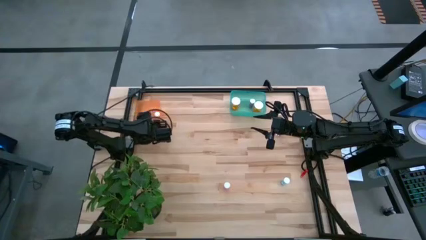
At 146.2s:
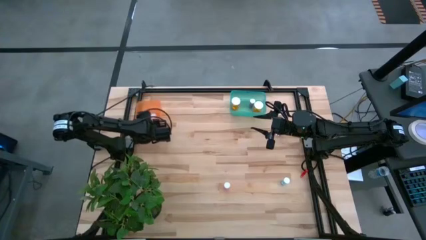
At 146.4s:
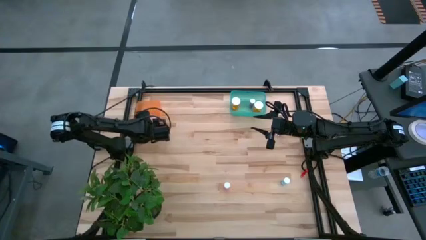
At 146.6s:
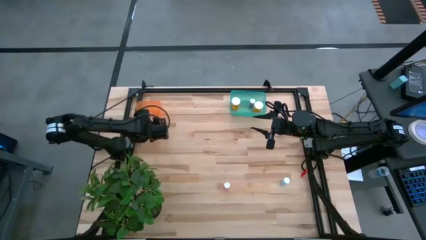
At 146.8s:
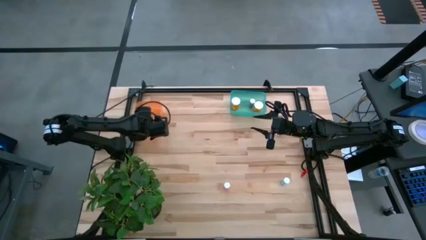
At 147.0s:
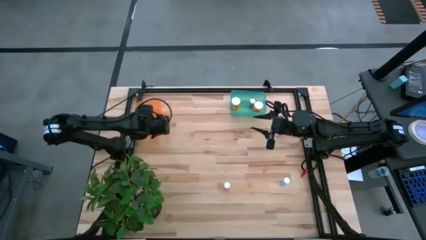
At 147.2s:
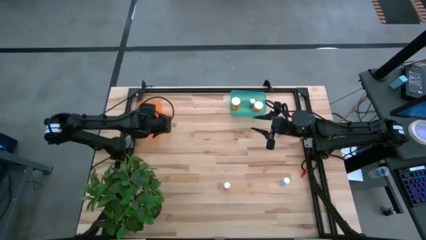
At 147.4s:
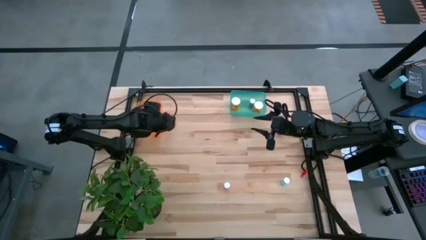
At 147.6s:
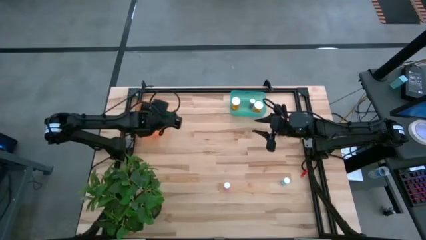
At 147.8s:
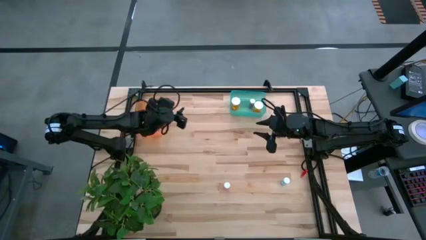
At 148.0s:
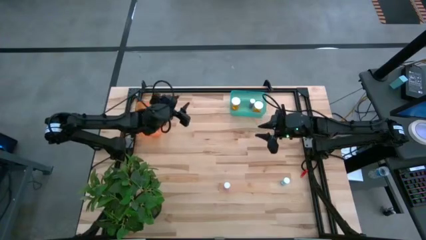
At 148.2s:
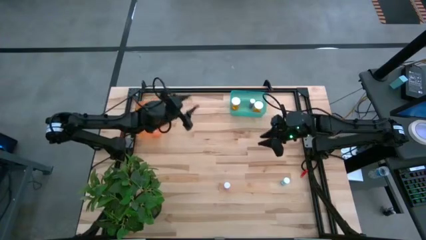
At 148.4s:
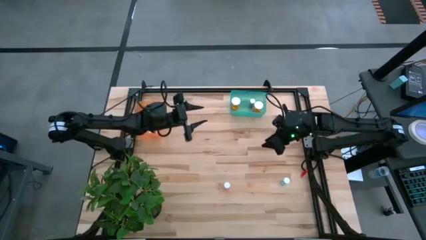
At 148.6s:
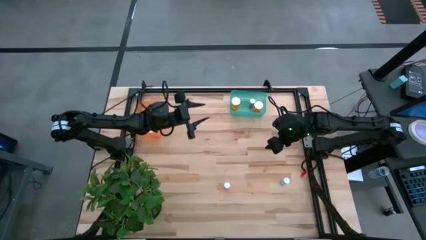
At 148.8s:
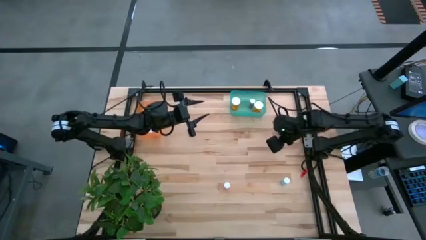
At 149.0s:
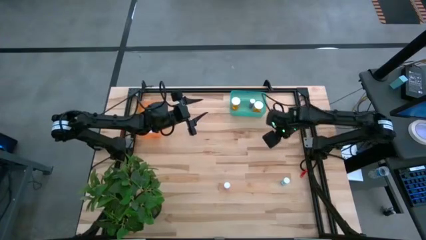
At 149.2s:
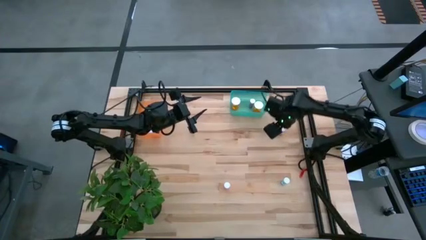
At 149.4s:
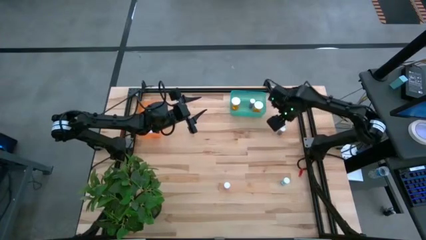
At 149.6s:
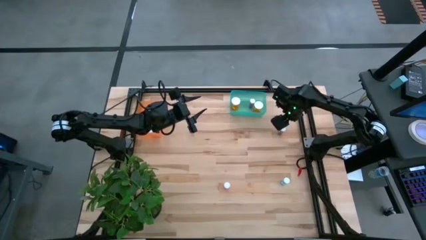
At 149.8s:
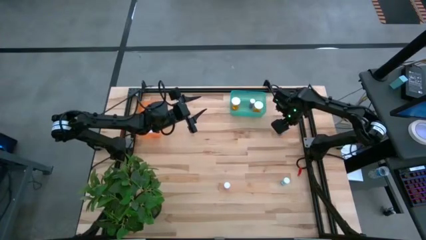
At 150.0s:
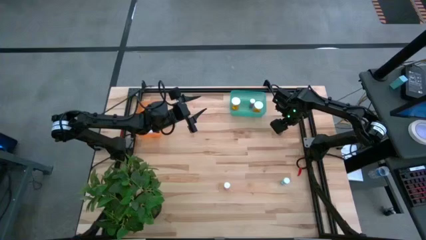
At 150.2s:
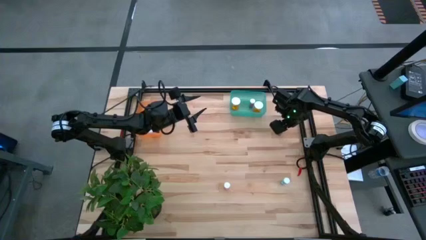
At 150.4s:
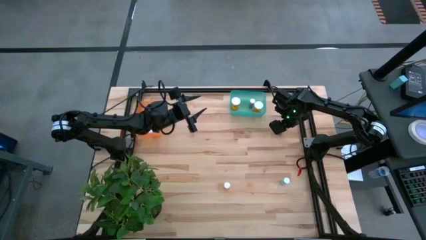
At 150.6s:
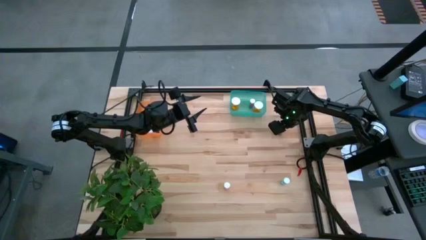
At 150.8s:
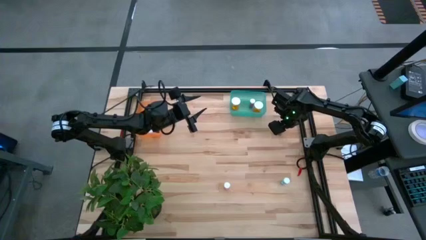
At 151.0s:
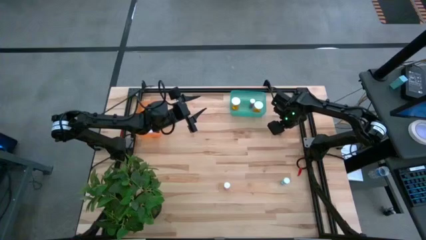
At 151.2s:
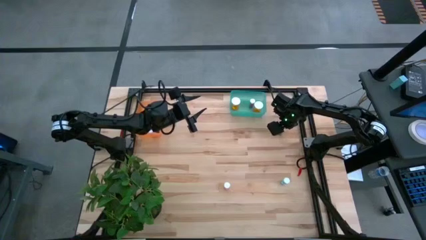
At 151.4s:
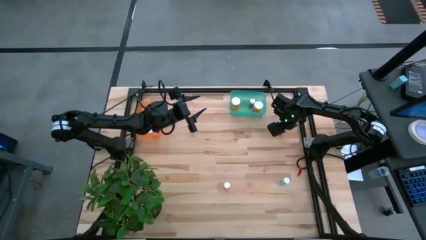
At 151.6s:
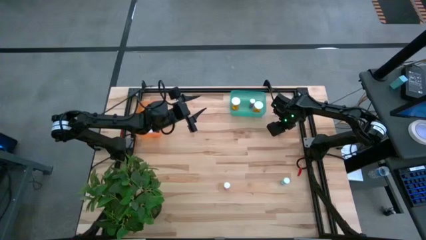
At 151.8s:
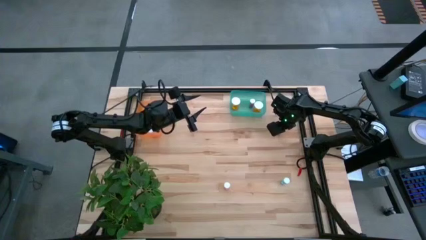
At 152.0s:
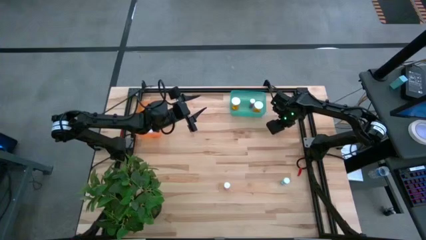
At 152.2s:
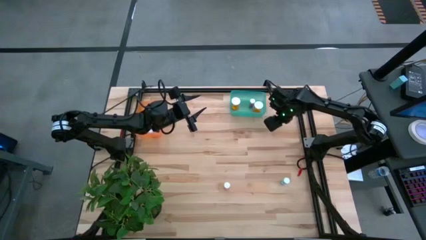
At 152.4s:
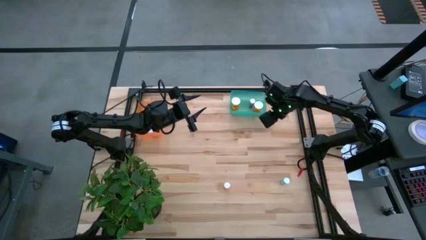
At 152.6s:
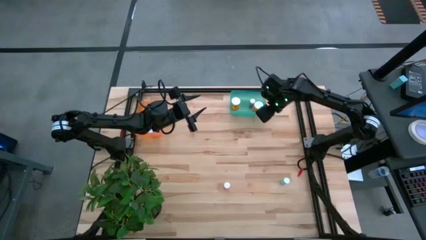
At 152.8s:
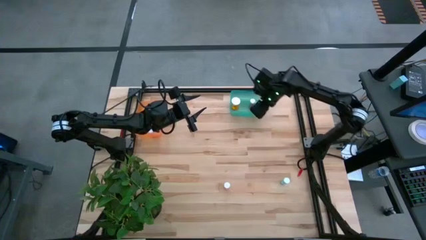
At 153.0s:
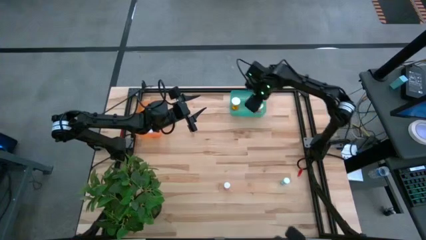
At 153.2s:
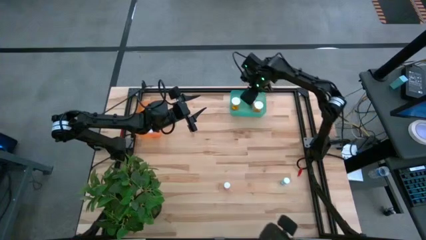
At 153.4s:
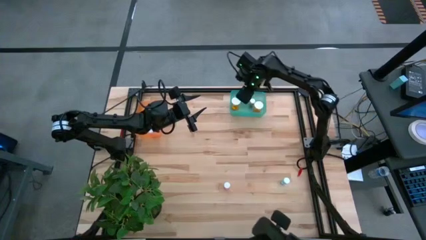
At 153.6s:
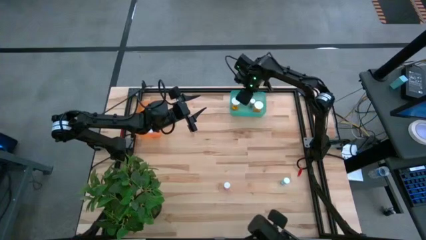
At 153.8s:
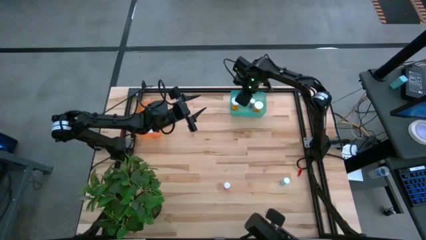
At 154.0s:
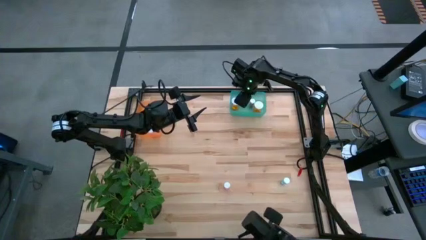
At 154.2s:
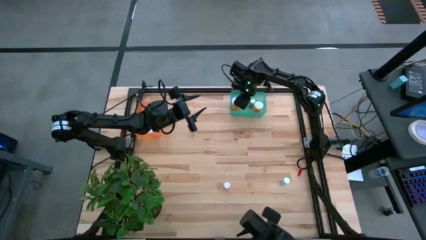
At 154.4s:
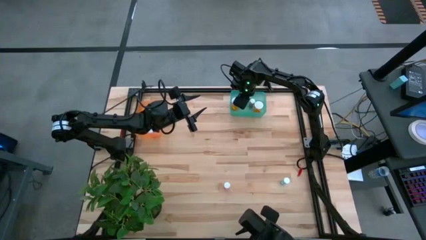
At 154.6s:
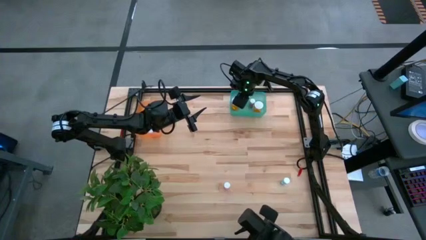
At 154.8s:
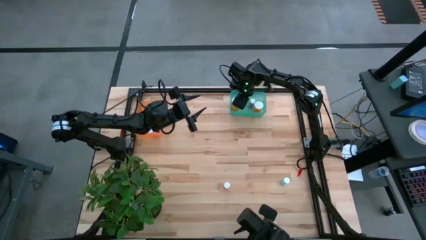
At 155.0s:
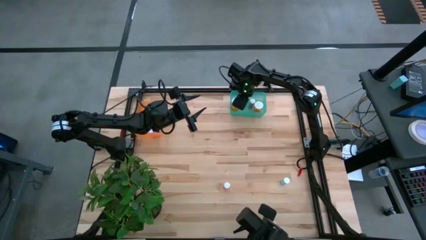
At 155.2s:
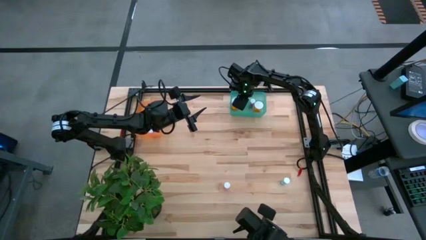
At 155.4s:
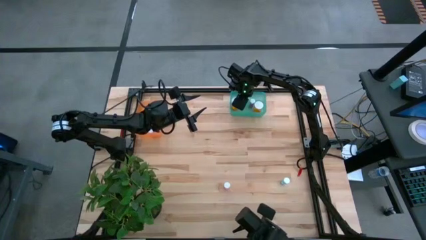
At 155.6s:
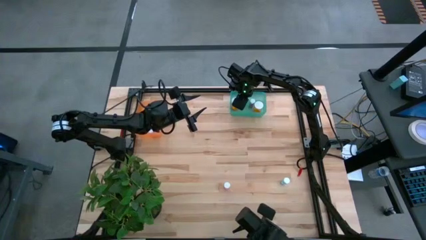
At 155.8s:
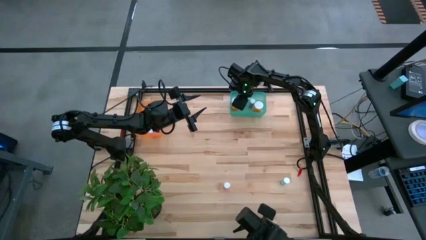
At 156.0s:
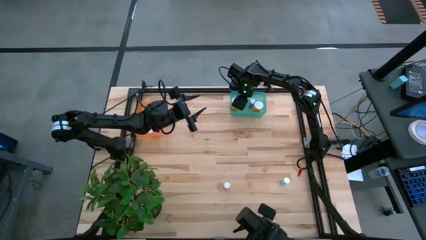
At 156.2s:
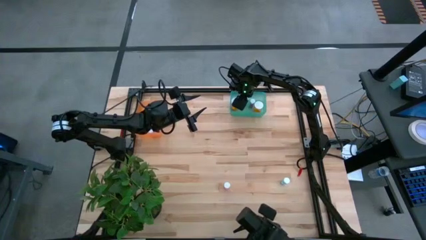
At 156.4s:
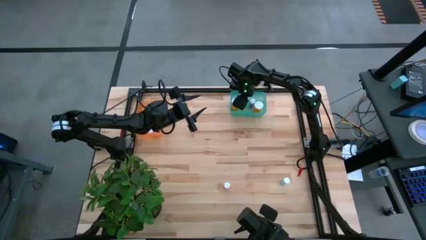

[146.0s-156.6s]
Task: Pick and place medicine bottles into bin by pill shape (circle, oval)
Put the blue capsule bottle into the green bin

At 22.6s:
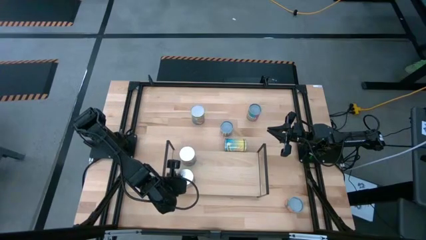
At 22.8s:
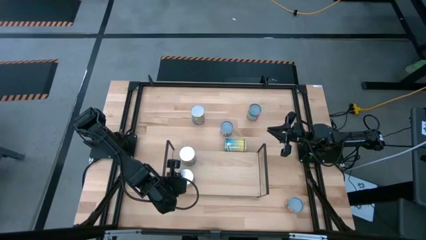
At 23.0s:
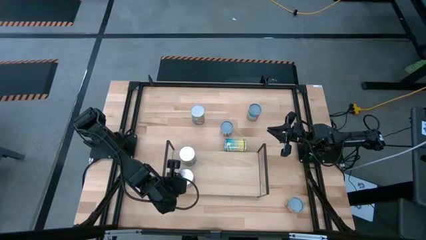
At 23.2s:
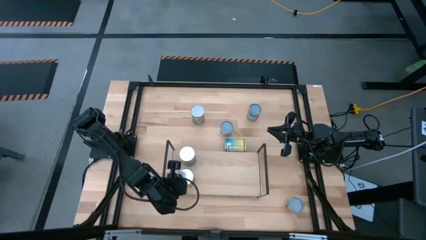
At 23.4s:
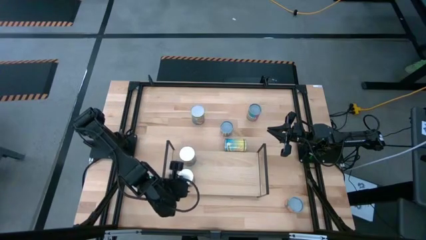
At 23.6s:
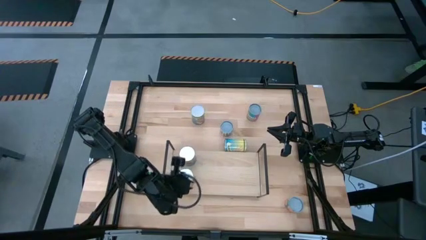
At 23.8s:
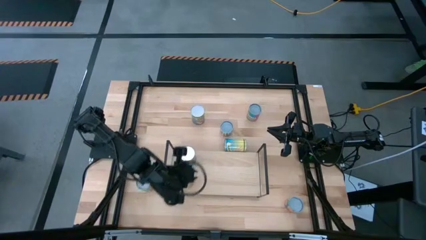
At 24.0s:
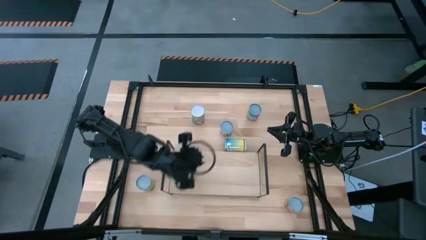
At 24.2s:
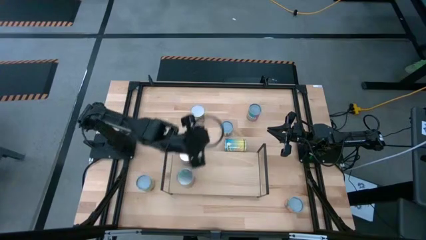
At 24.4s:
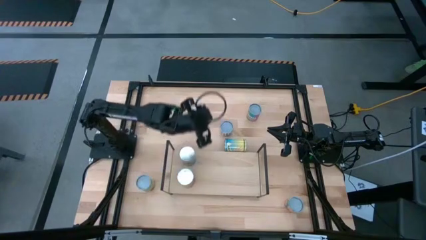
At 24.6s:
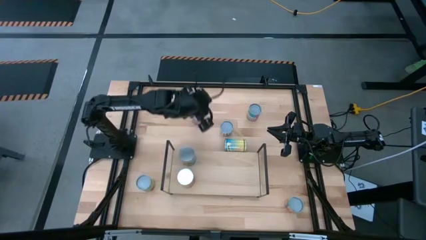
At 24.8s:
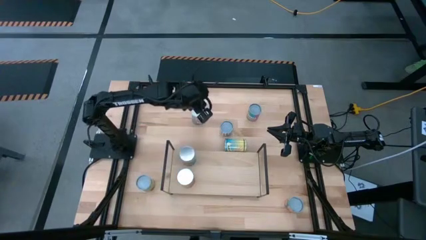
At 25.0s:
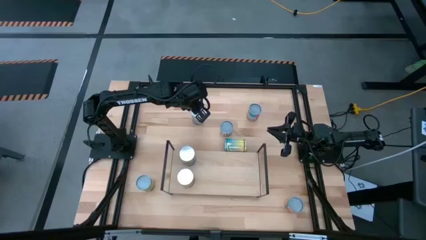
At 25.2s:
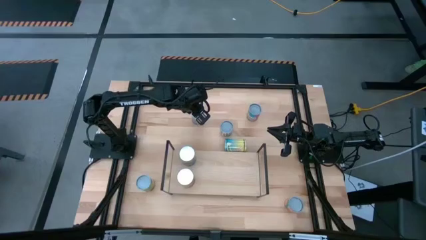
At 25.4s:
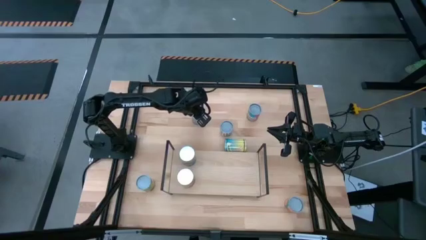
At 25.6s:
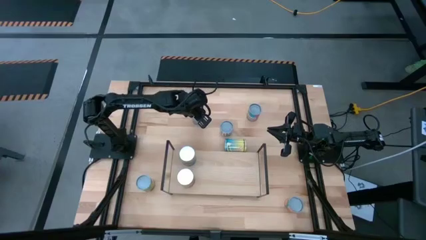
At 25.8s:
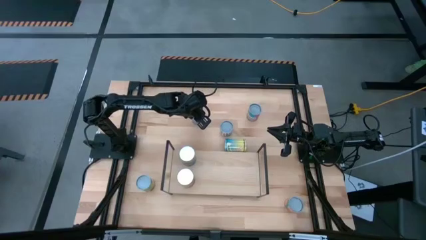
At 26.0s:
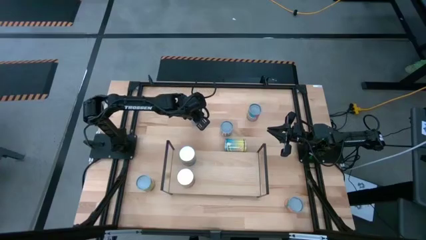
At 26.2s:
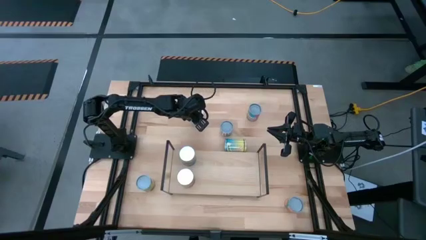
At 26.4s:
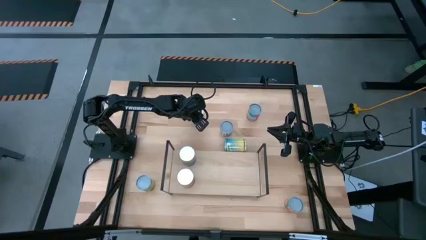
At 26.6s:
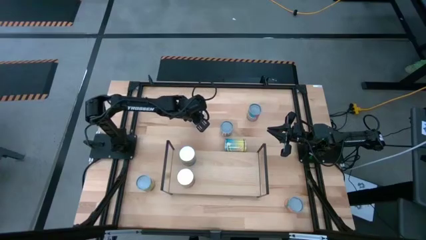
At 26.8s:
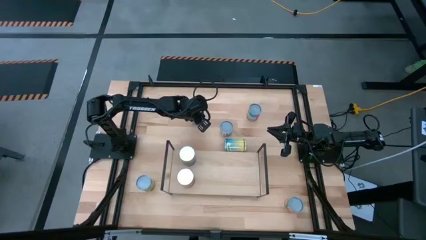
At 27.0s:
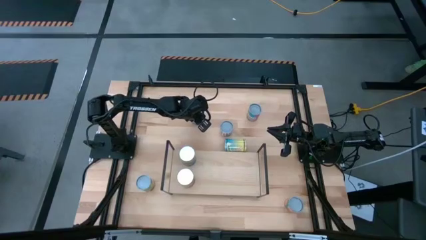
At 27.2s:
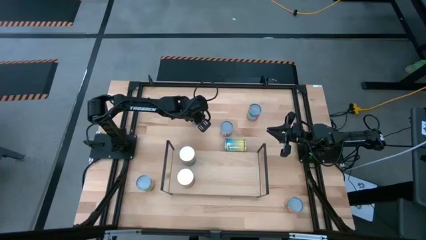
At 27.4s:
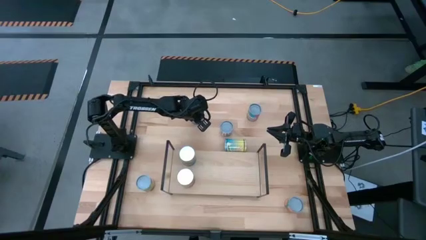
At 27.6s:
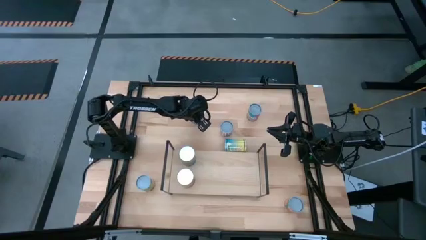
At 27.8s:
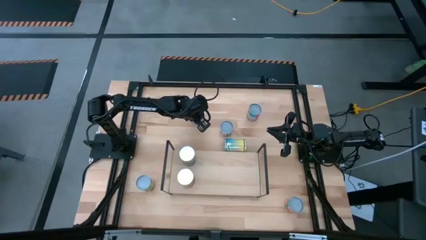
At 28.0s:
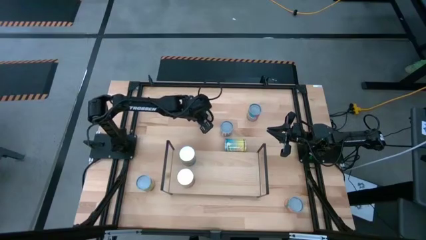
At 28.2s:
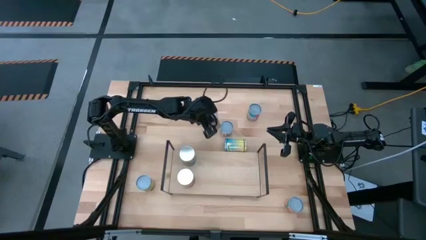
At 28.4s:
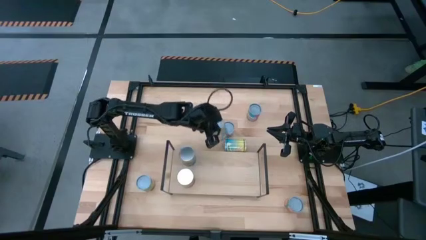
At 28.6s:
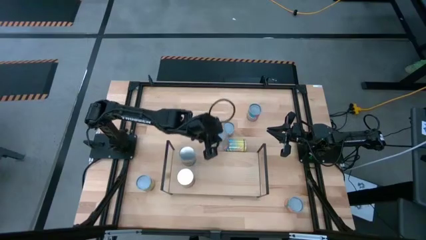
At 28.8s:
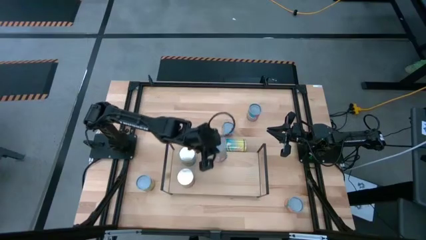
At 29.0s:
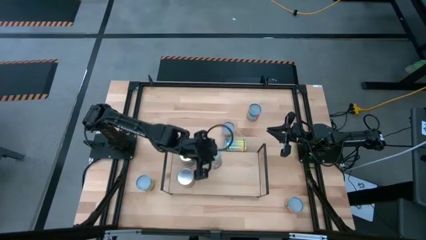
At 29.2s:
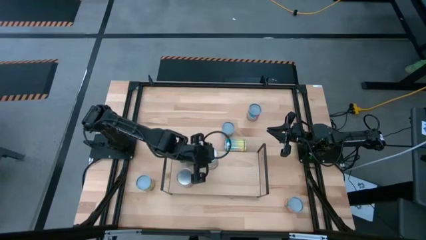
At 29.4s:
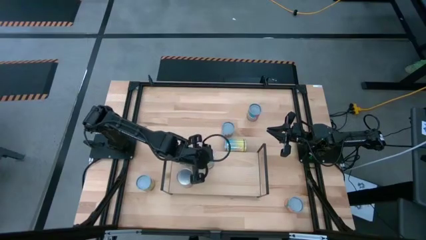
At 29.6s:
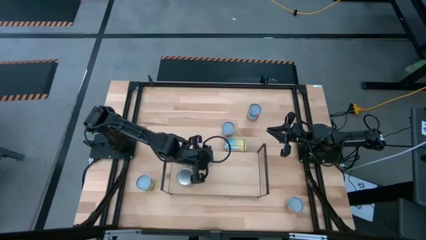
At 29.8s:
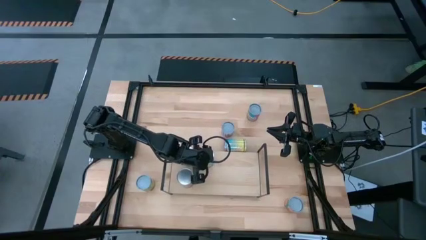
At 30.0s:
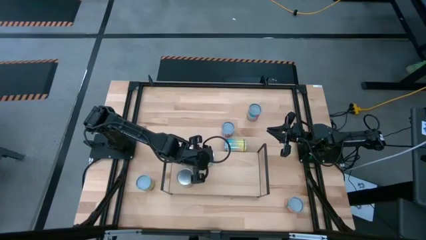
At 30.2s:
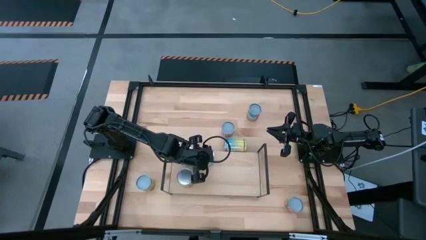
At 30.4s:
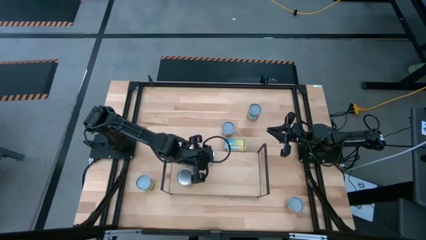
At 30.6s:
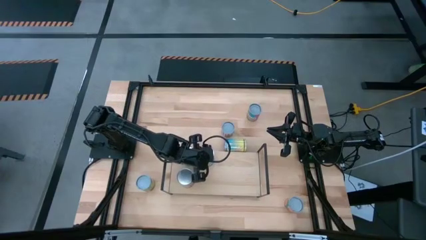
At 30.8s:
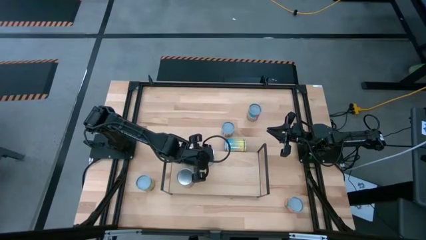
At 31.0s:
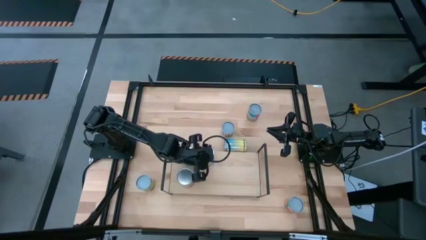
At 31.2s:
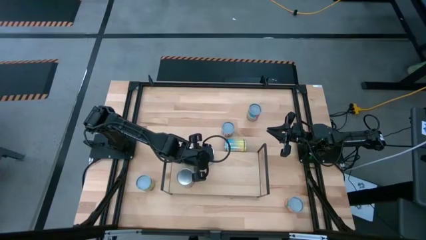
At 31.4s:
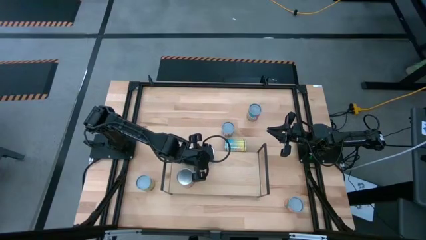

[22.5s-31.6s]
Task: Pick and place cans onto a shelf
Put the yellow blue canned peaches on the shelf
